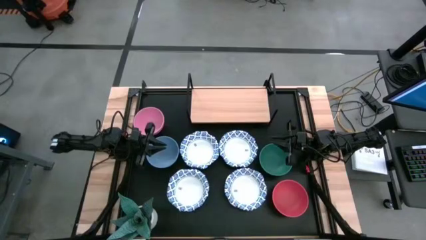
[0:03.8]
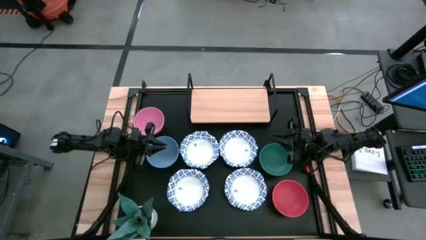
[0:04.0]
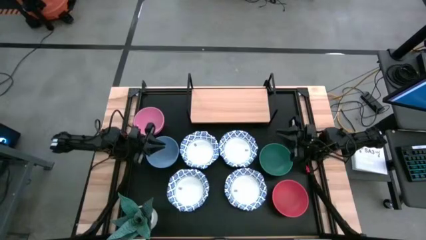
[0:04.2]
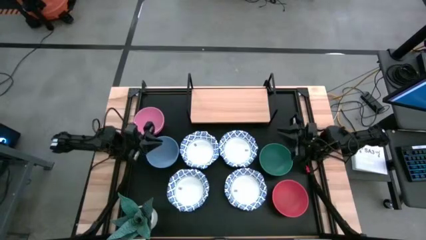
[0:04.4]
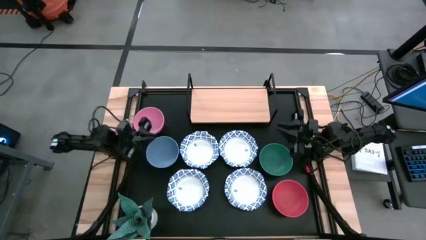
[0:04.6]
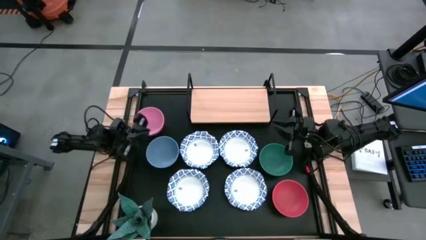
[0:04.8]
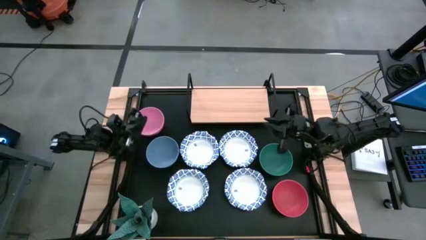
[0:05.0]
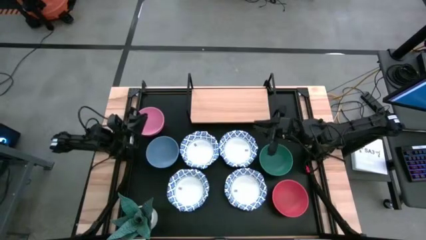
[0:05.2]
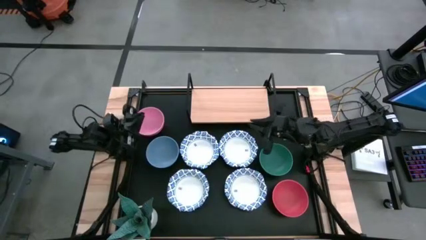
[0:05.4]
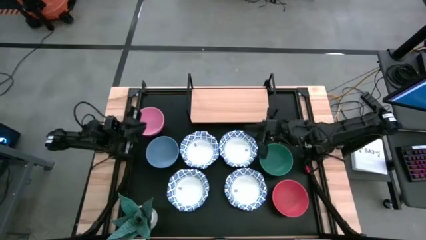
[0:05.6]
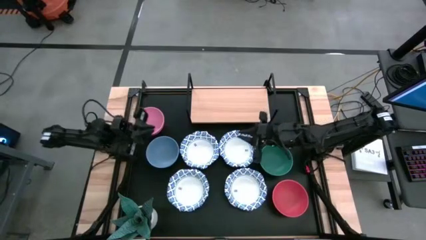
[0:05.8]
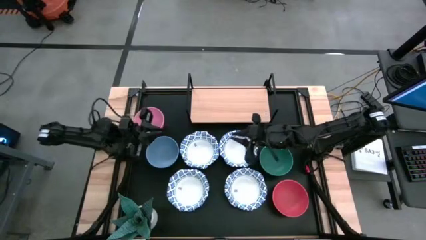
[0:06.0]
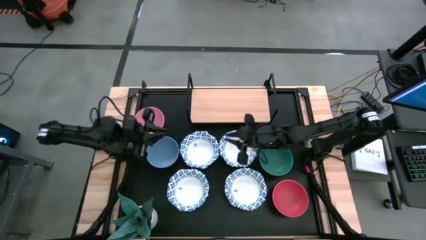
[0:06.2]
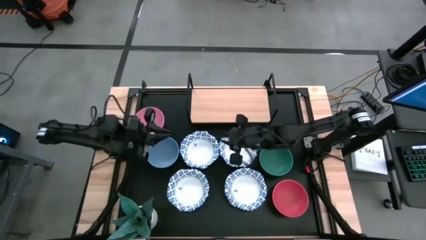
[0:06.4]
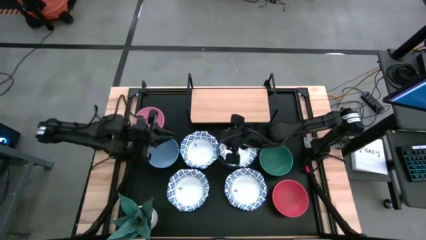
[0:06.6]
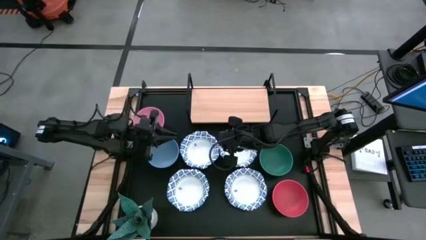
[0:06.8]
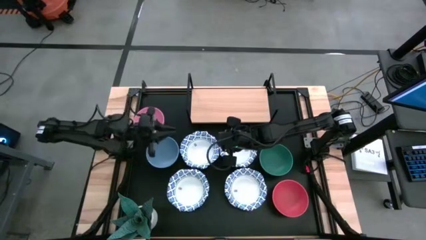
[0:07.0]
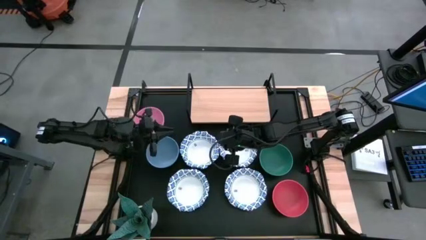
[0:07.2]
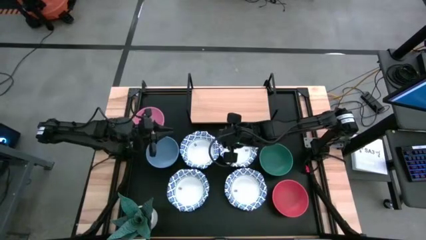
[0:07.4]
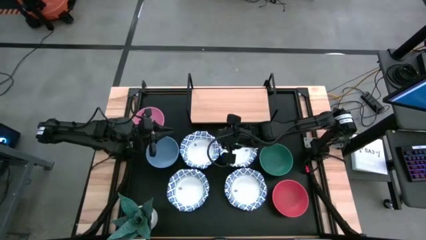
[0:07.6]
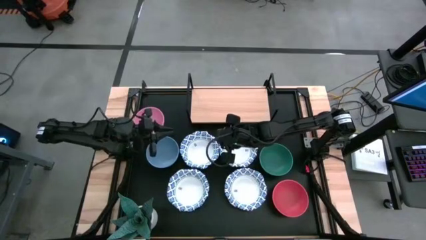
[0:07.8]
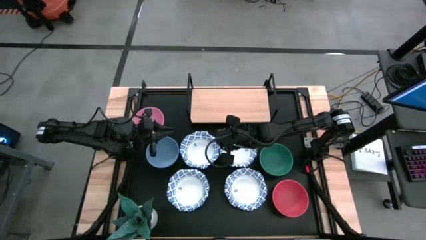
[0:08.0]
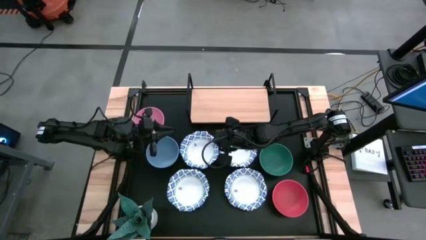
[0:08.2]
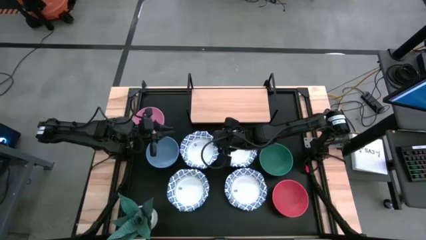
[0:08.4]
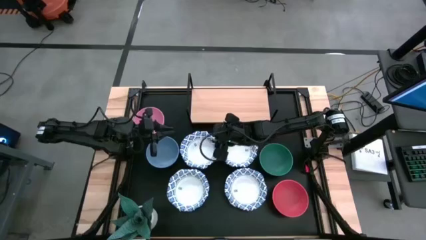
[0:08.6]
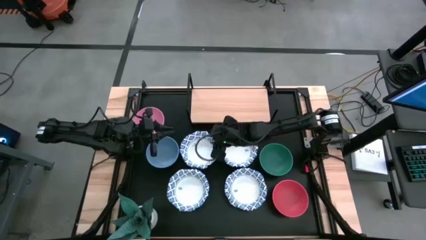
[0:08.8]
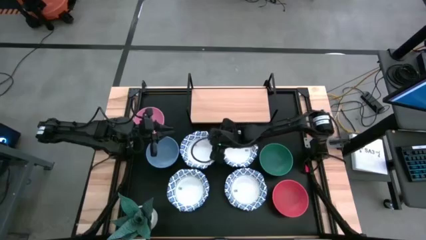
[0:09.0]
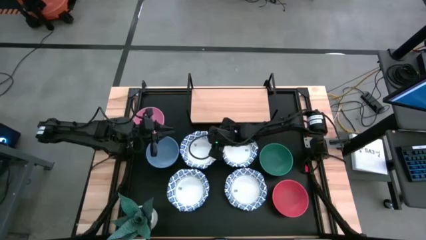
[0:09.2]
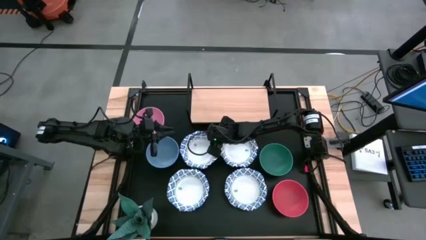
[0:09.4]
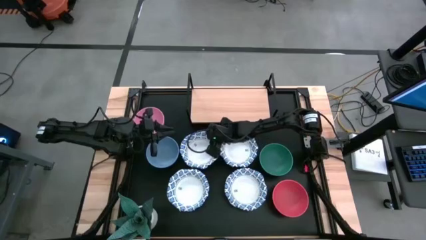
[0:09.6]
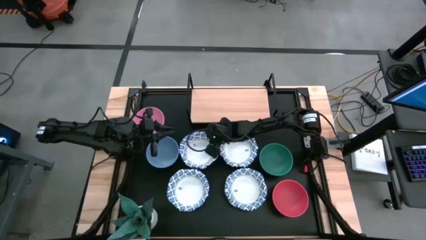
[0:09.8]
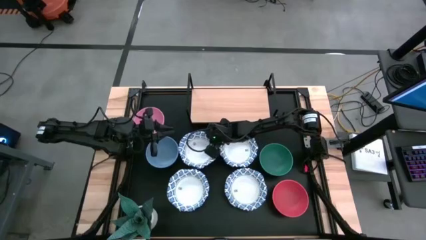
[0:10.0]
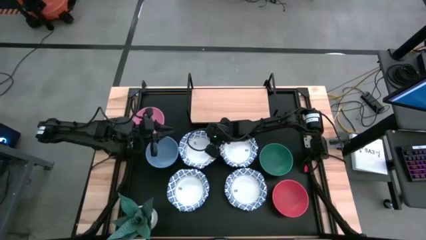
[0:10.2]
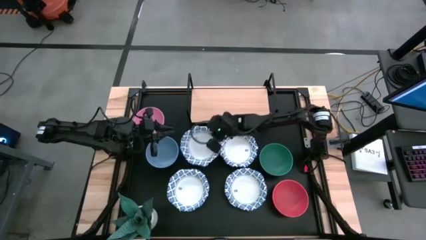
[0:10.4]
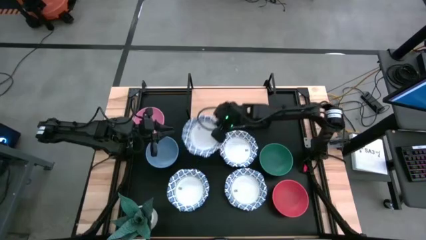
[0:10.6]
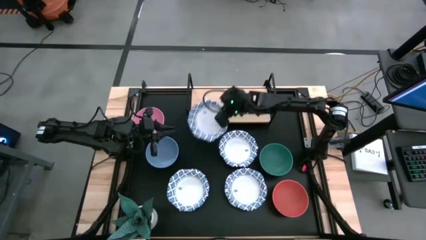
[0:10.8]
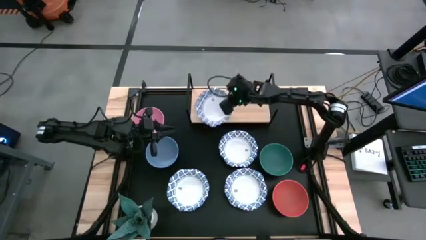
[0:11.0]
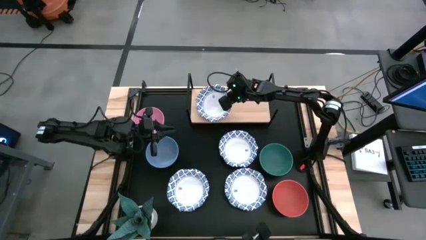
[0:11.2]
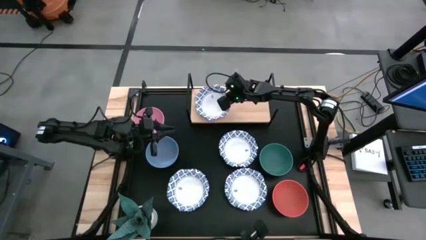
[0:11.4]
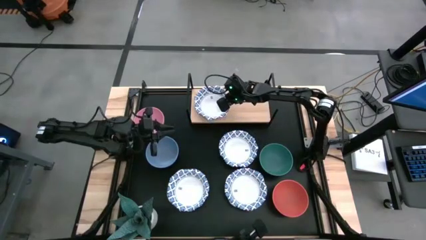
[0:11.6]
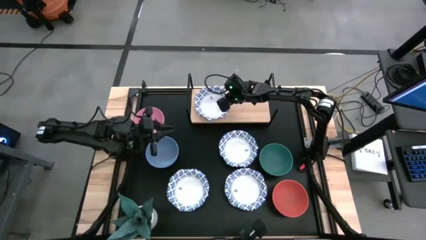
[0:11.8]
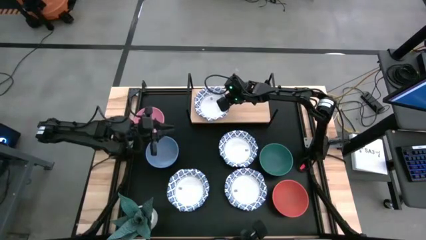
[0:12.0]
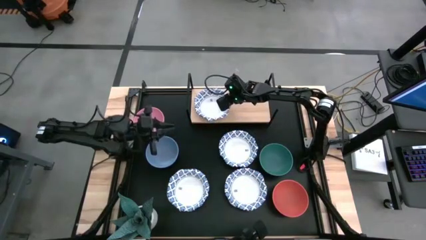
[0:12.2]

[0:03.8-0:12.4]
Task: Place and stack bowls onto a shelf
Put the white and blue bowl on the shelf

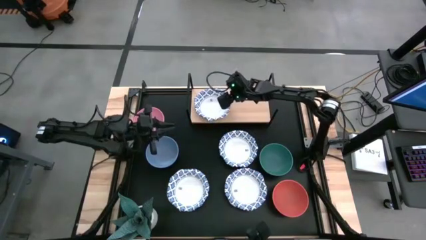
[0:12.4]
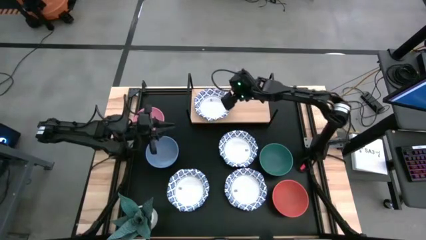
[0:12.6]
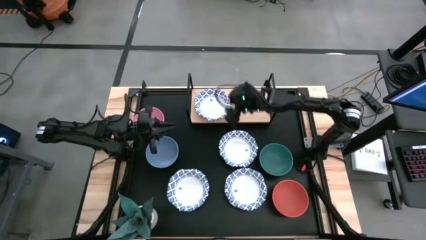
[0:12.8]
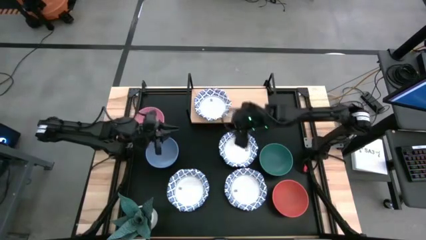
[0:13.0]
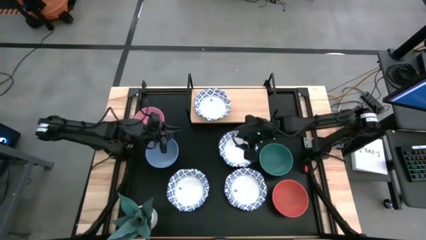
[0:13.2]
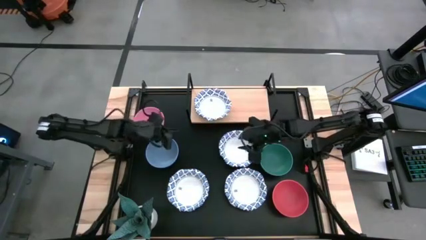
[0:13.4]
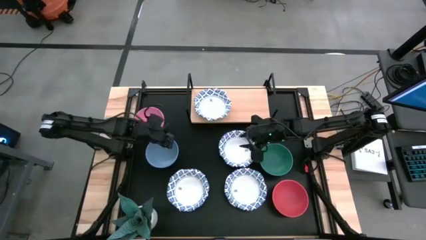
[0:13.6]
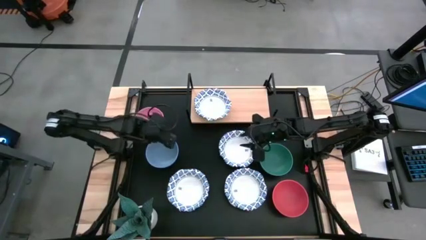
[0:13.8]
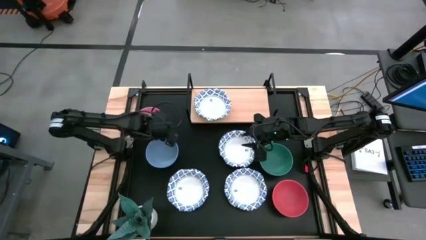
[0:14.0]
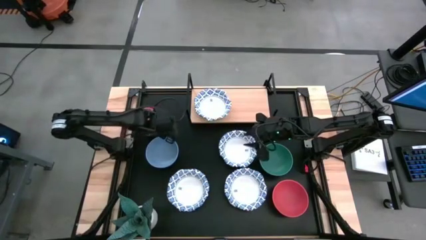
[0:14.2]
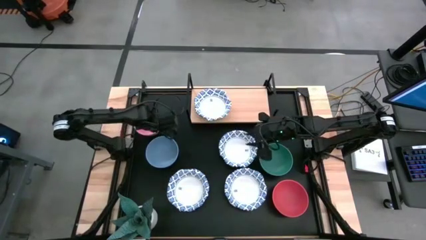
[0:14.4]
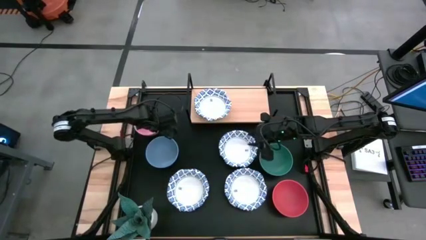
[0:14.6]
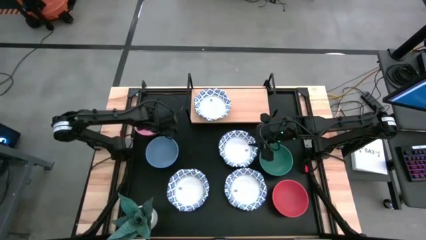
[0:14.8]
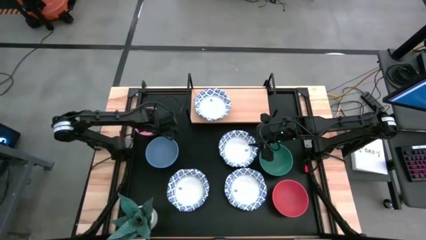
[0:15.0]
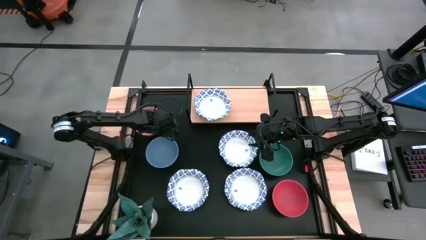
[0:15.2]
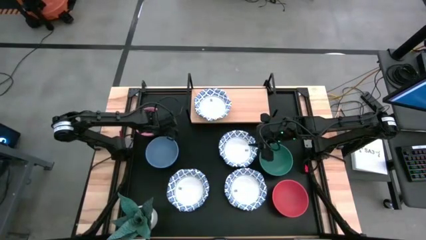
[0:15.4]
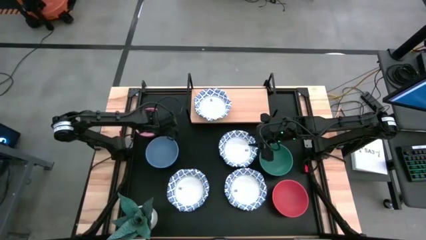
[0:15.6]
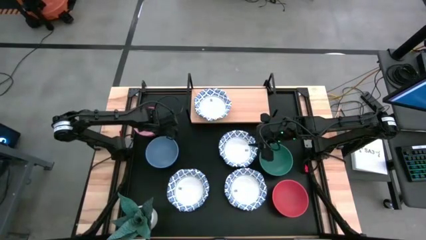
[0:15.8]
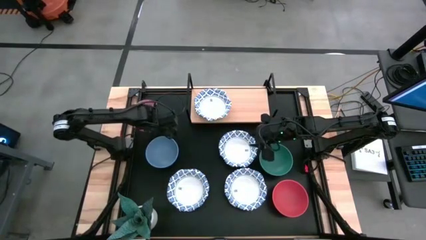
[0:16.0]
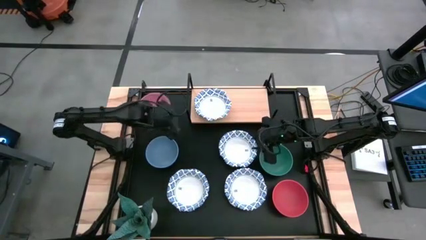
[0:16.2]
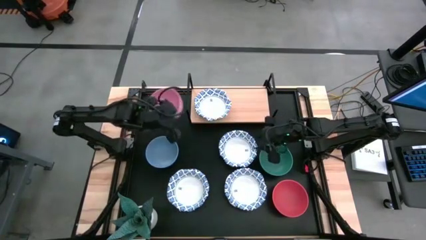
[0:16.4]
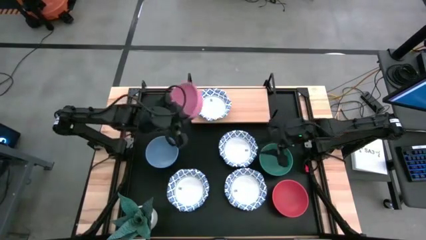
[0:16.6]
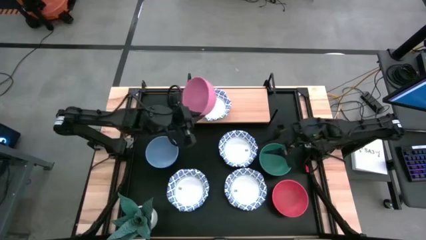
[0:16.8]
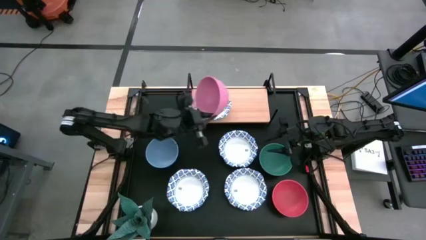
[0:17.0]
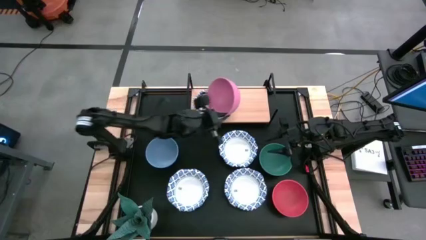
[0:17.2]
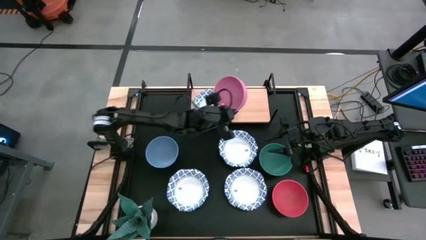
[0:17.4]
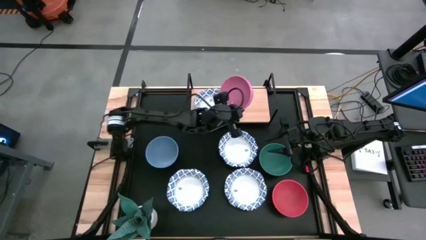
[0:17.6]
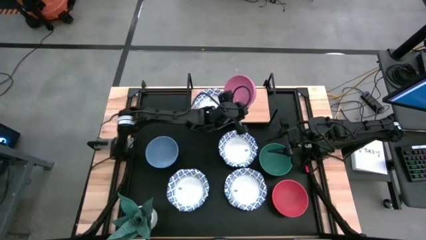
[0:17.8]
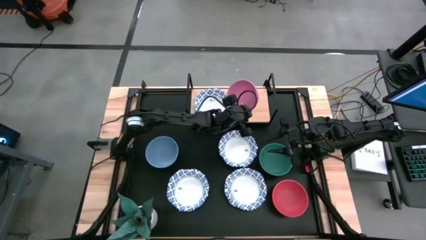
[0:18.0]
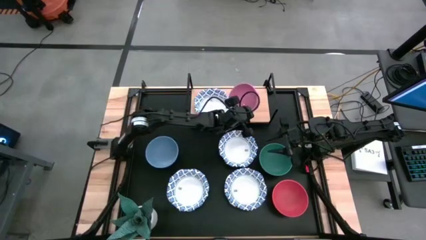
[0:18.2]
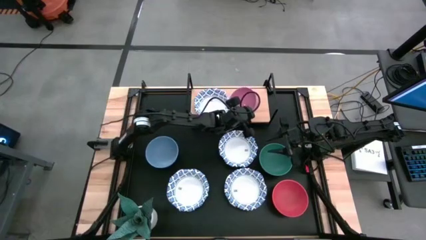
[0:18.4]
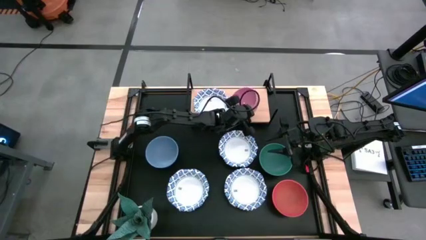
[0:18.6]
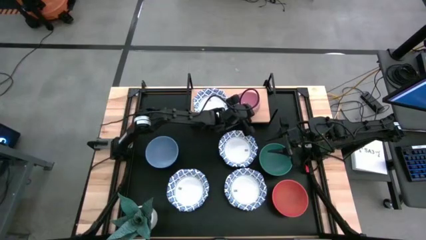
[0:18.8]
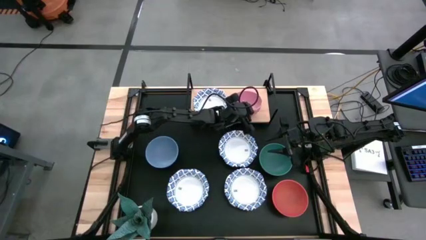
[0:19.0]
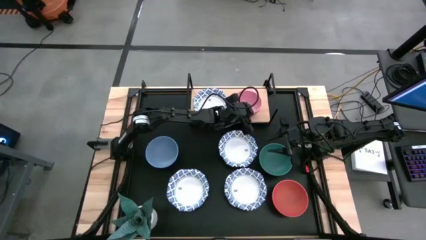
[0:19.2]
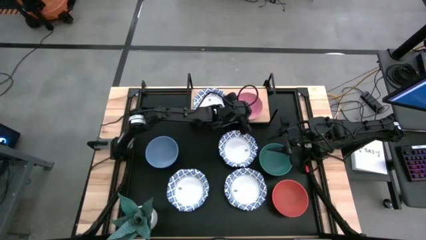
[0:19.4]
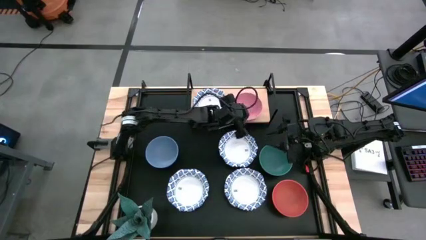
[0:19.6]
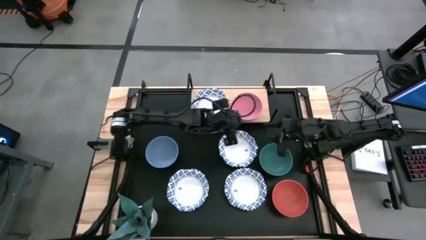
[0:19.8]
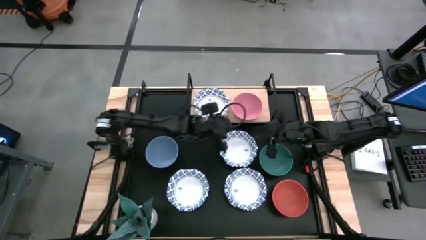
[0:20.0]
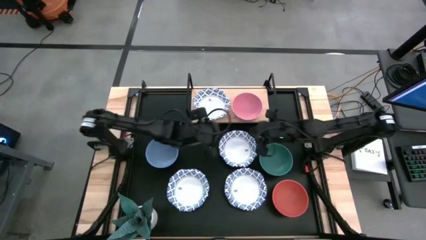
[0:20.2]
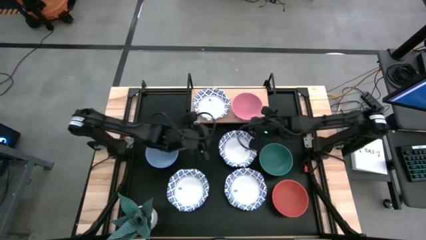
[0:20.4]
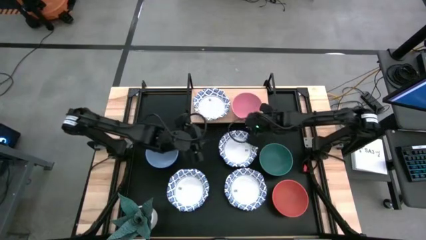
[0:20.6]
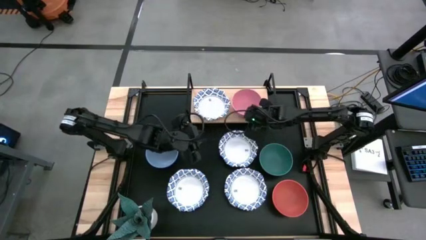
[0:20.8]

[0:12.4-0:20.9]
Put the pink bowl on the shelf
